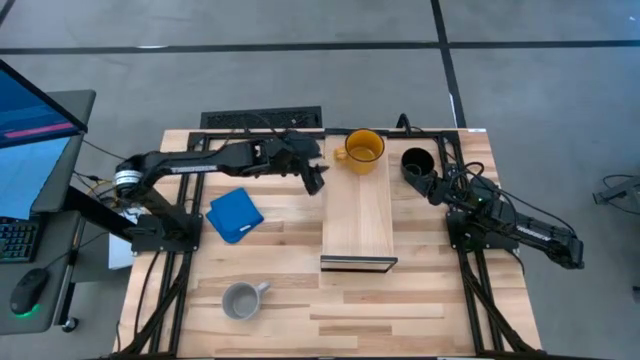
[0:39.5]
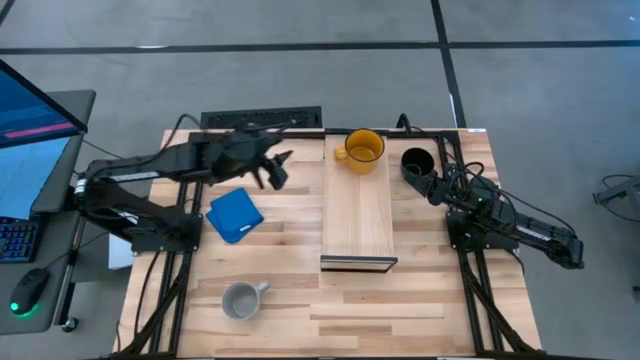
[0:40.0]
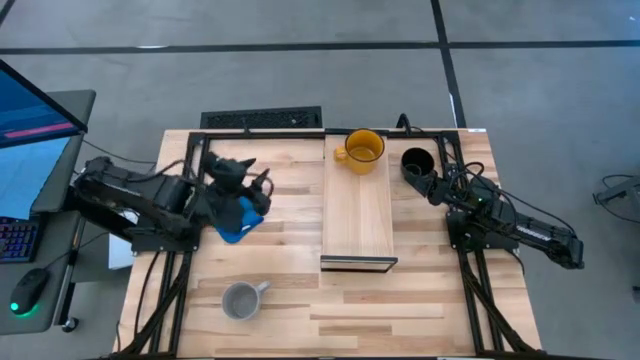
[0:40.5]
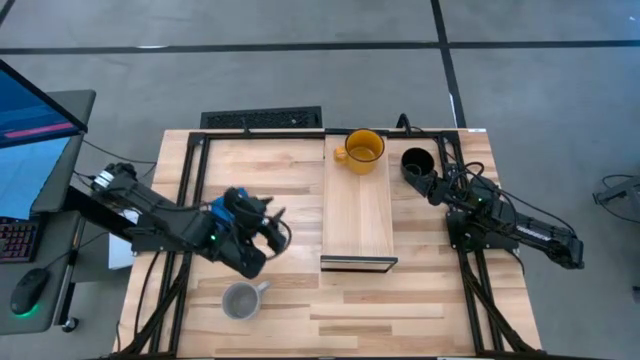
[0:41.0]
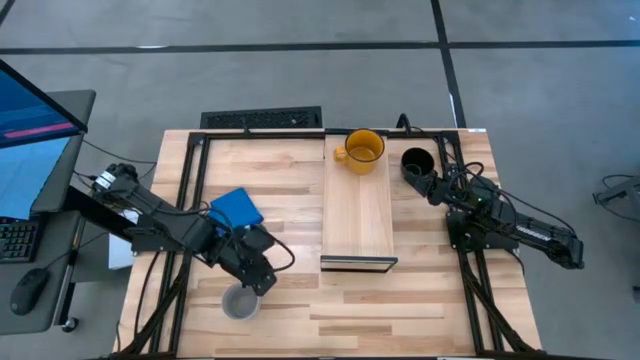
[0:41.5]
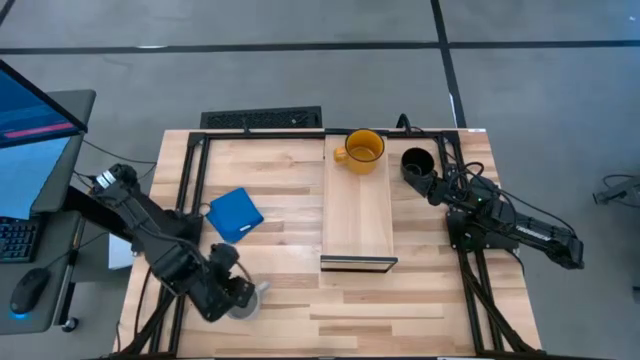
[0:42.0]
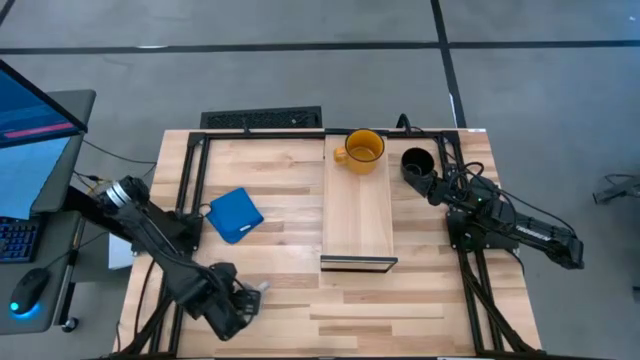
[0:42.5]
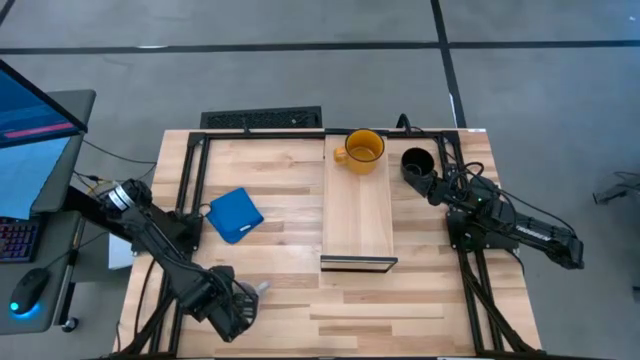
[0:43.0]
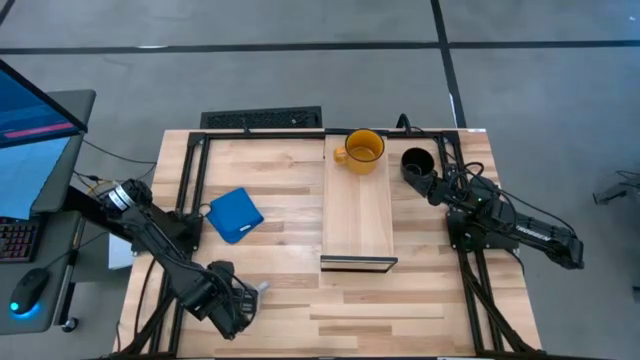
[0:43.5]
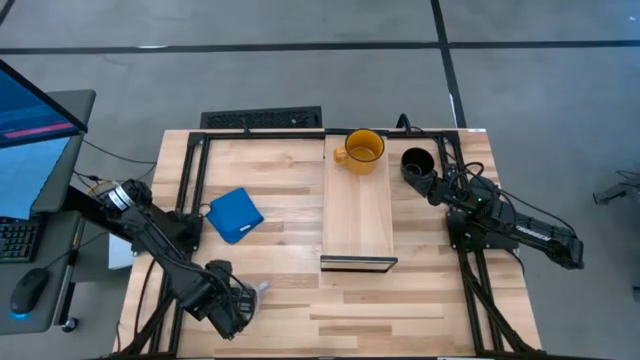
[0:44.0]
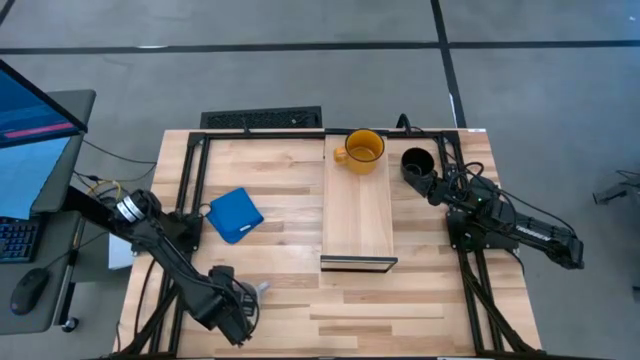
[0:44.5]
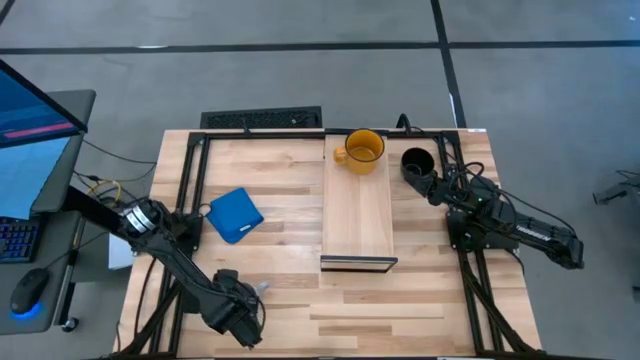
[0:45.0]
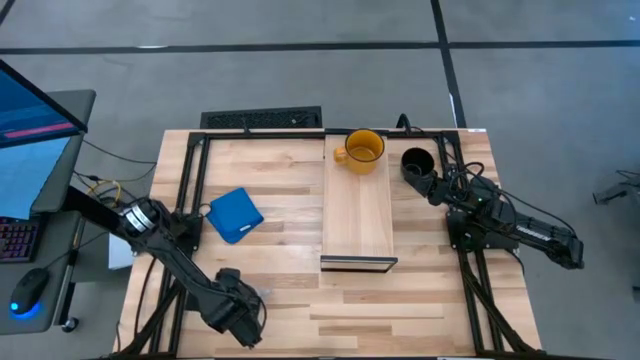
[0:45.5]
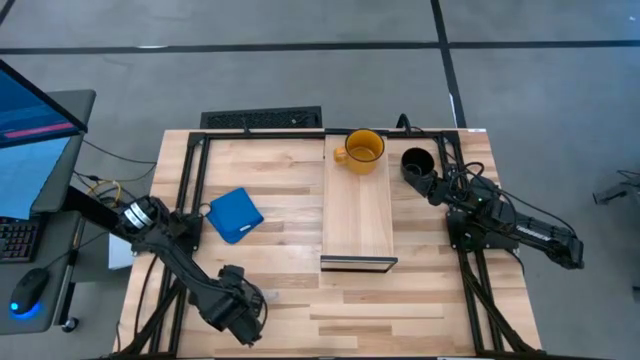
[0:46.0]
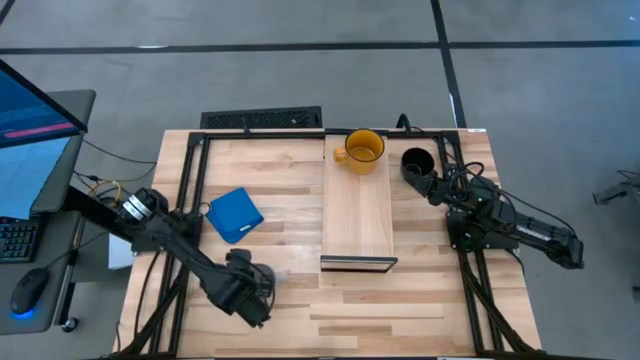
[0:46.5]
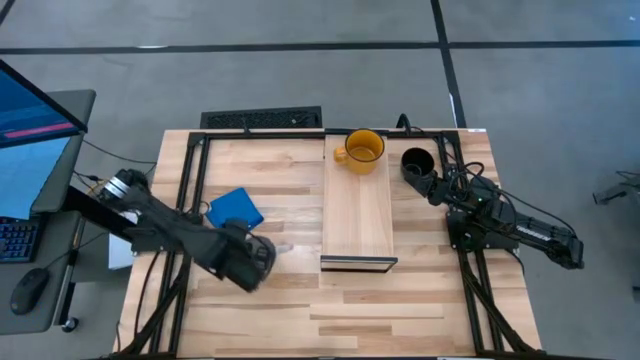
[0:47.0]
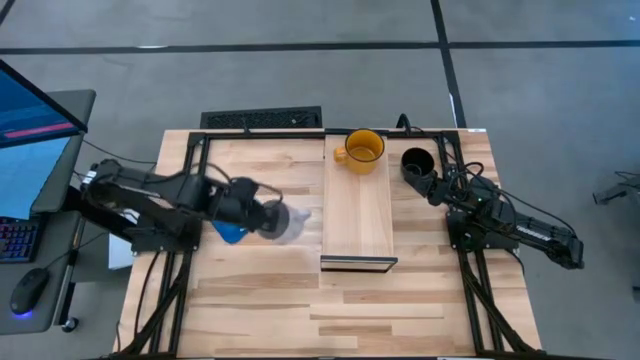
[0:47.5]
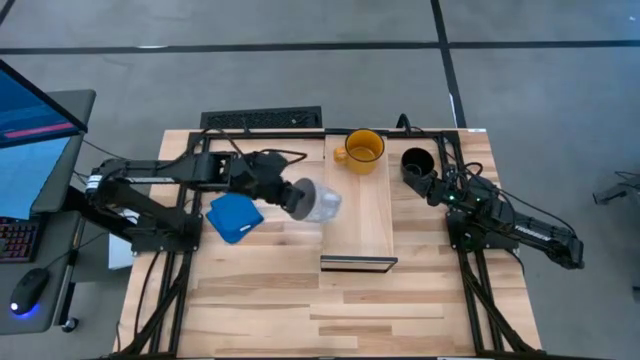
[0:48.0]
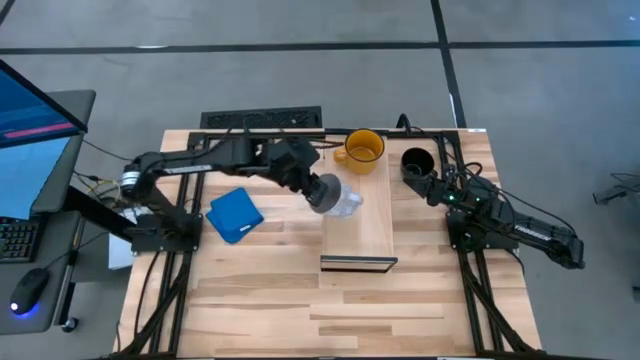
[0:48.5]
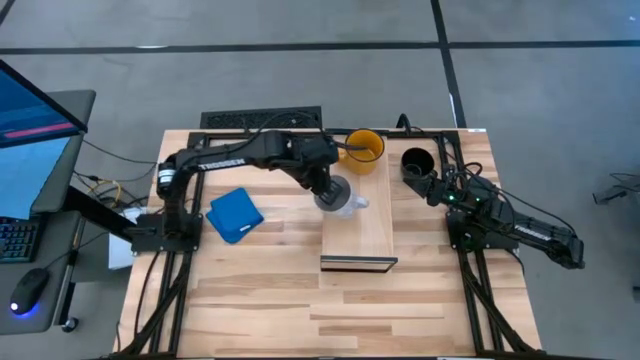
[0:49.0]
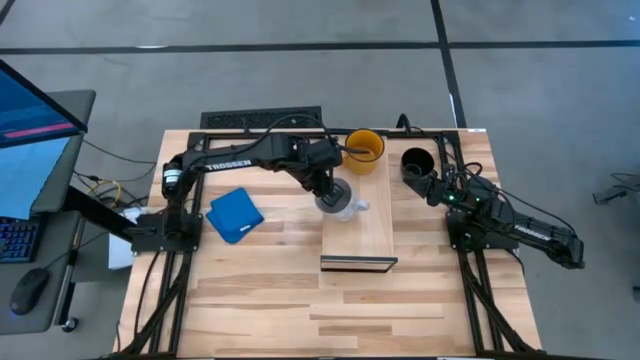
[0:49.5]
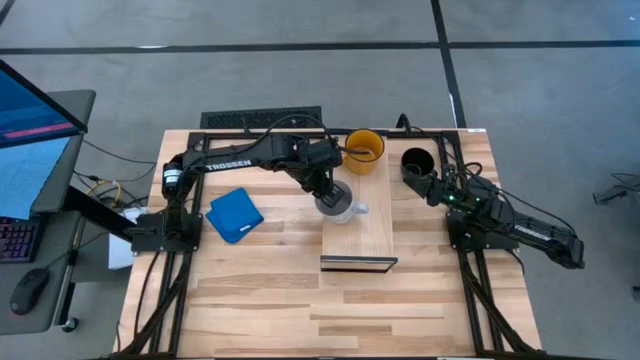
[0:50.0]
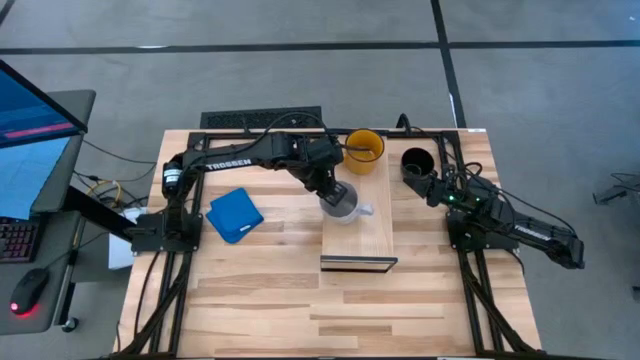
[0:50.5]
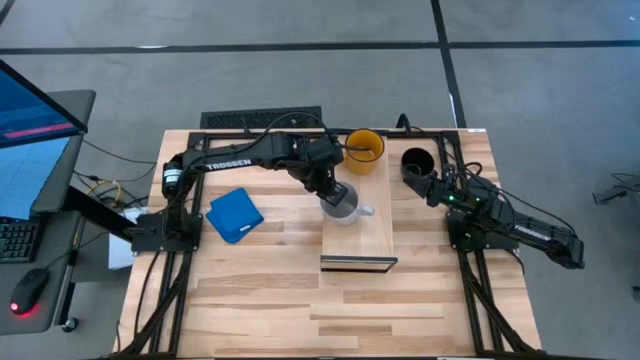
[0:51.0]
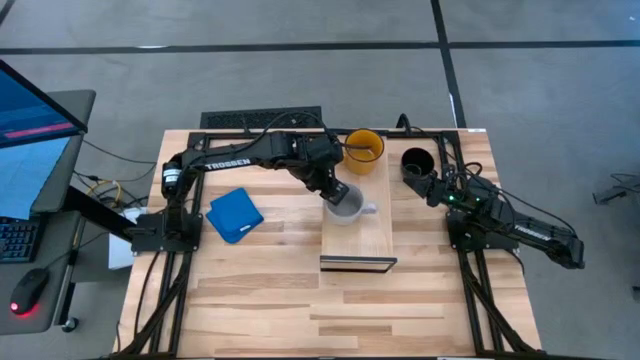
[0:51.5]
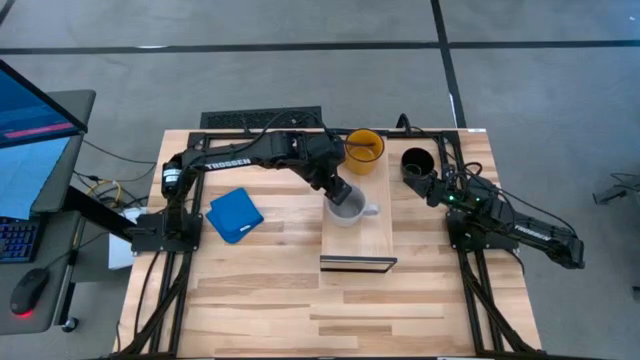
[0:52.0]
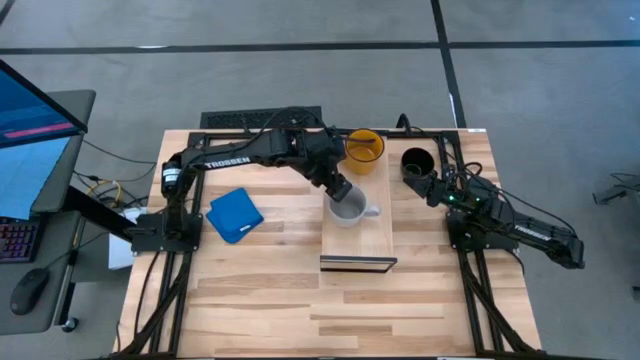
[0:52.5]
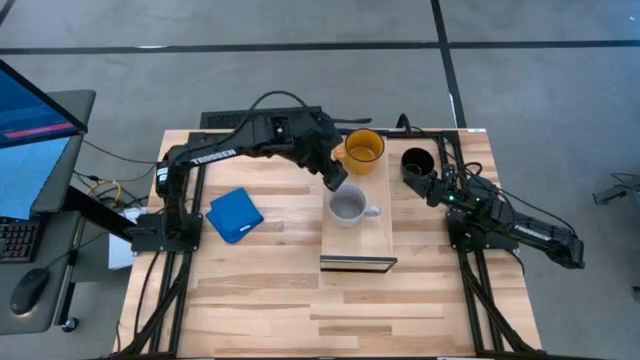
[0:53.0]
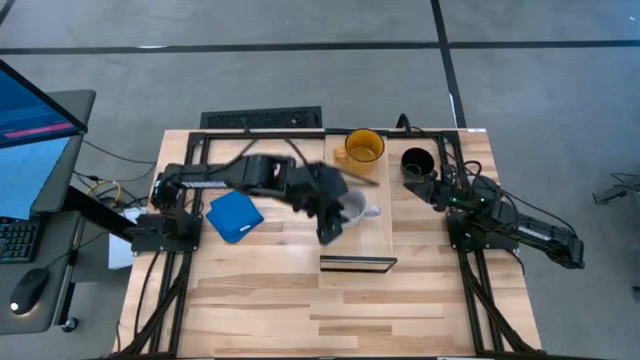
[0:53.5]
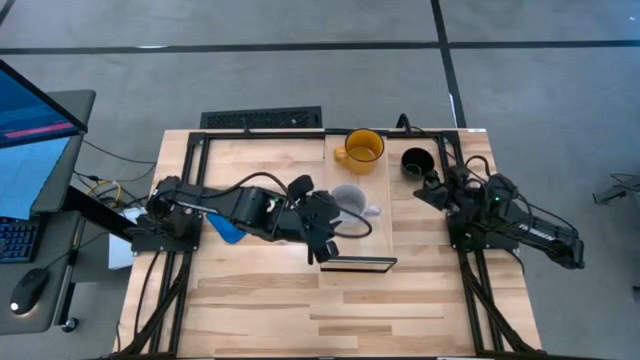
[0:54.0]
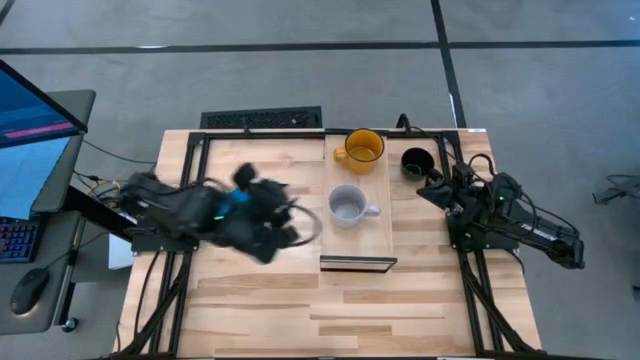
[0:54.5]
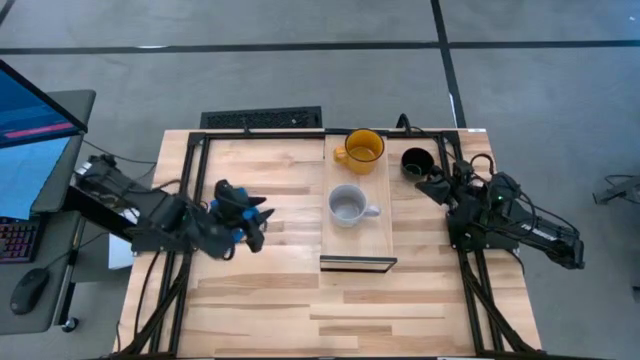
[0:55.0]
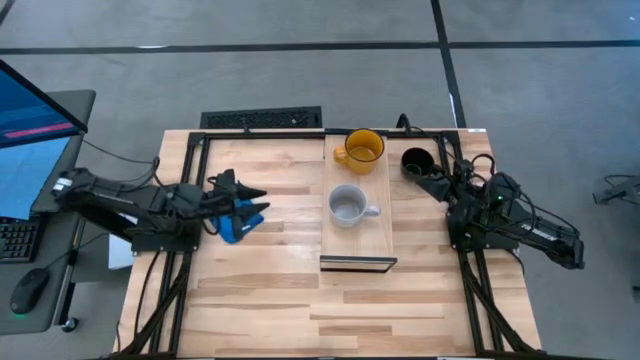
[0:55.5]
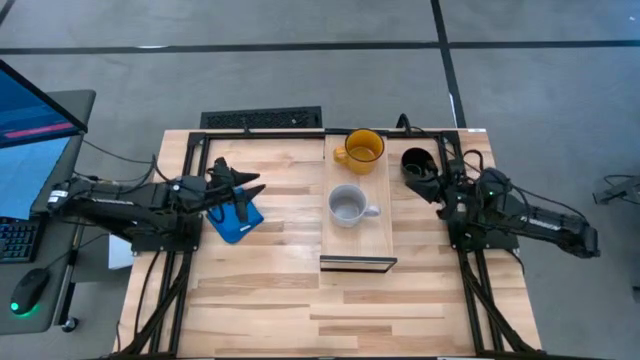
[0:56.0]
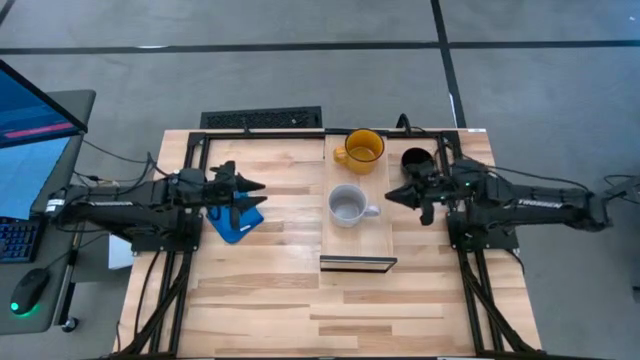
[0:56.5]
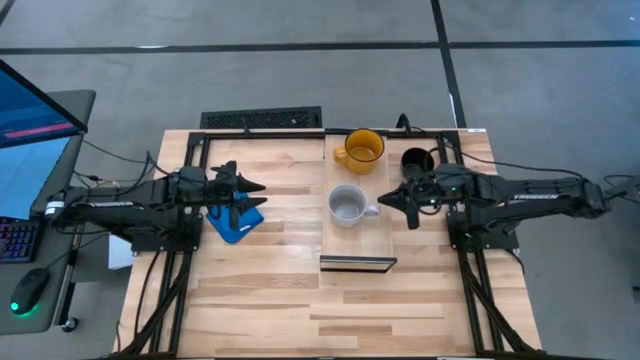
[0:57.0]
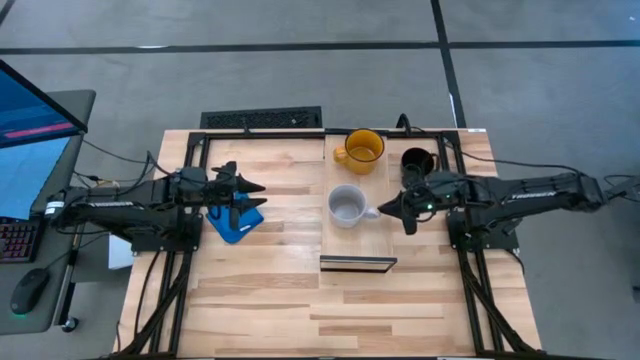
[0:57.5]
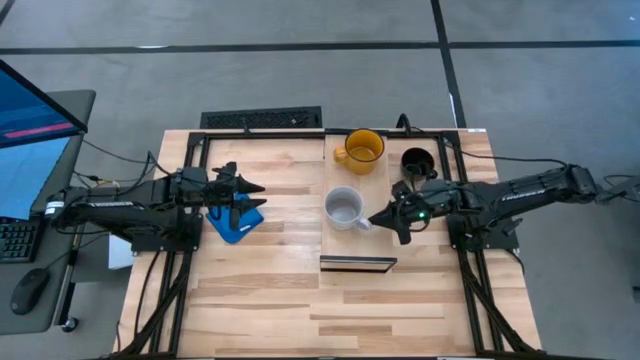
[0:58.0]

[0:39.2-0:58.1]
Task: Stack small to large cups/mugs on shelf
Put the gray mug on the shelf

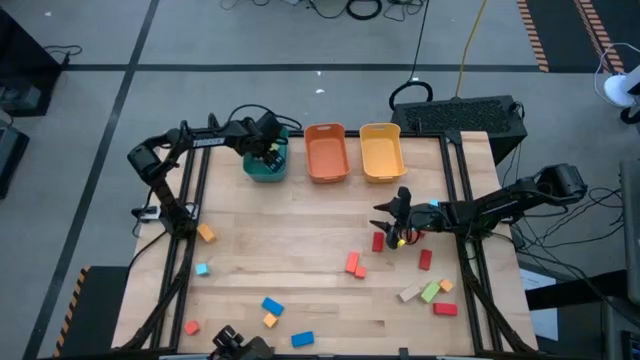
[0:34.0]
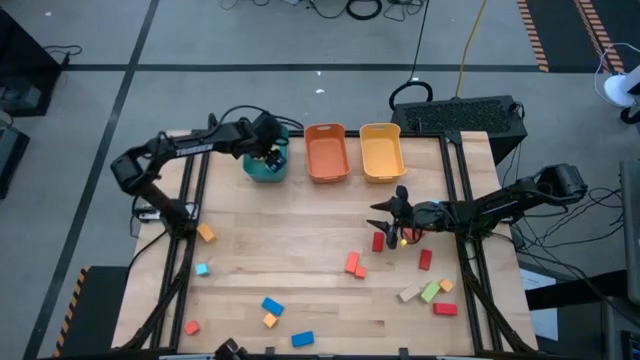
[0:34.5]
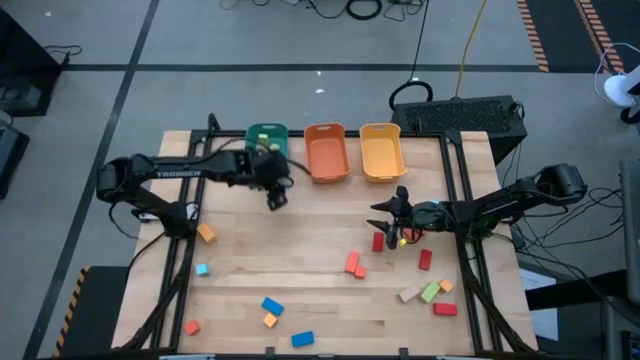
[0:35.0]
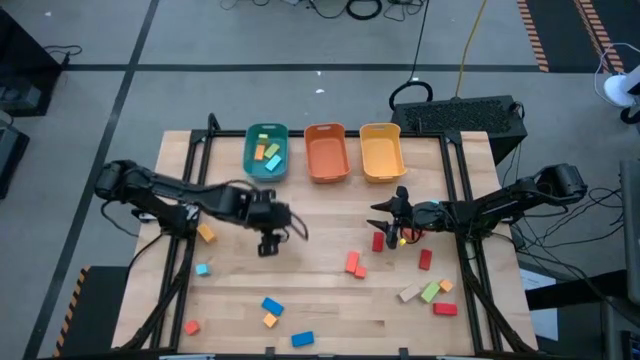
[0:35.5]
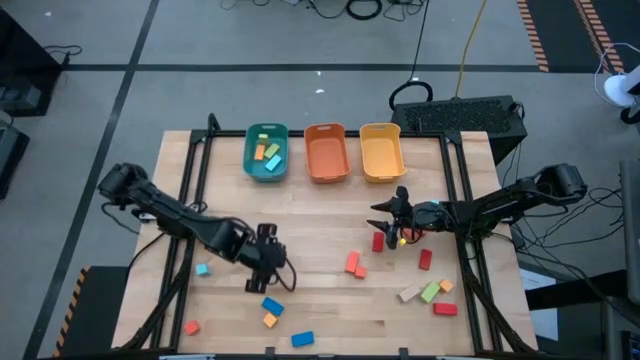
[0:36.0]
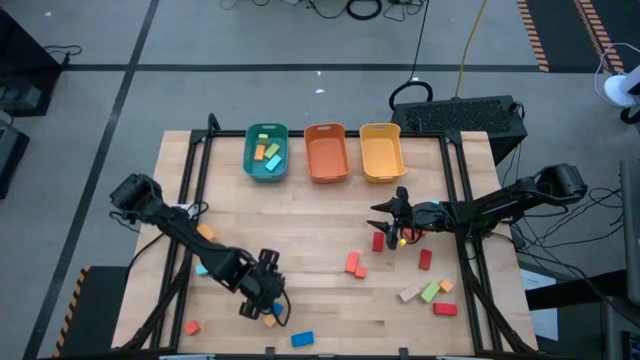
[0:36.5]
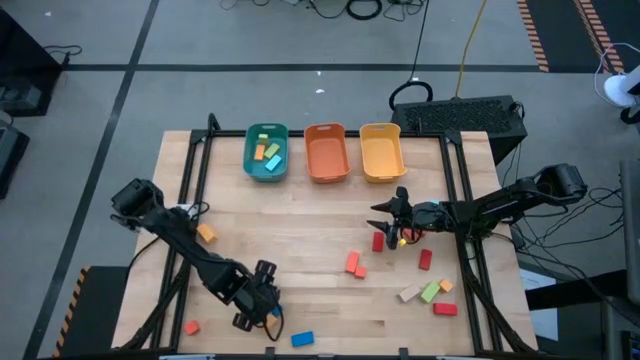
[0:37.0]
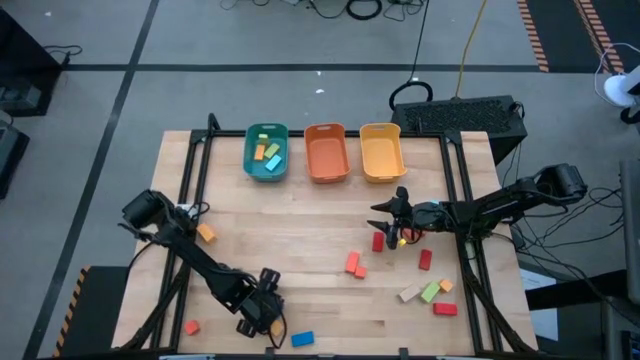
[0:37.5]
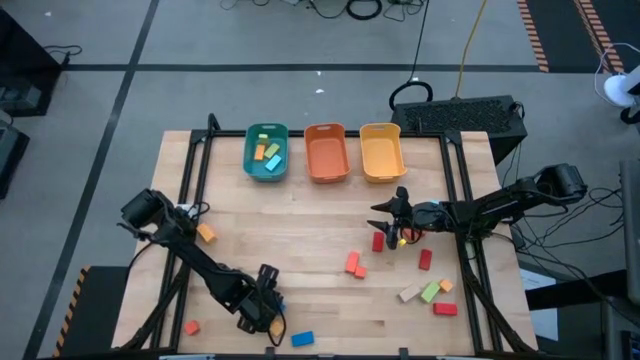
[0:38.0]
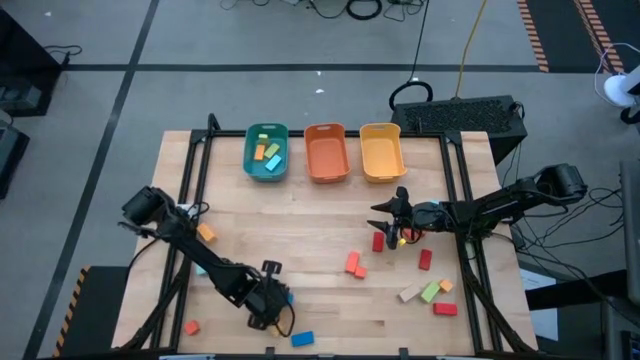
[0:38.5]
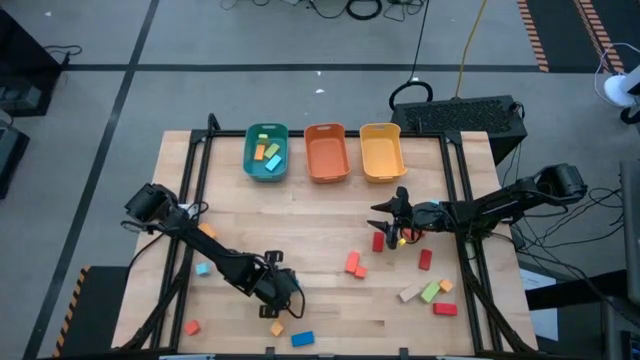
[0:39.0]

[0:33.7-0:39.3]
Task: Sort blocks by size
Put the blue thin rectangular block into the blue bin
